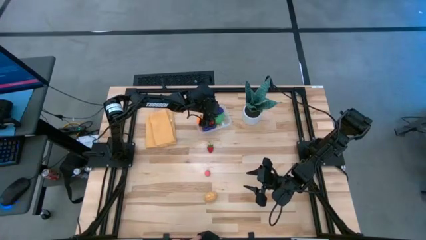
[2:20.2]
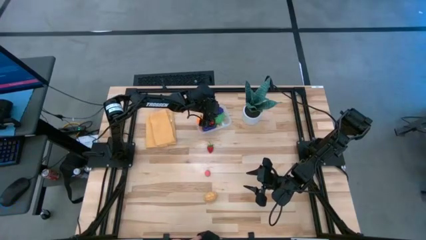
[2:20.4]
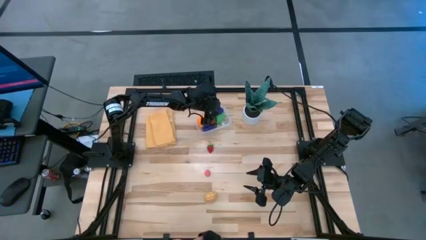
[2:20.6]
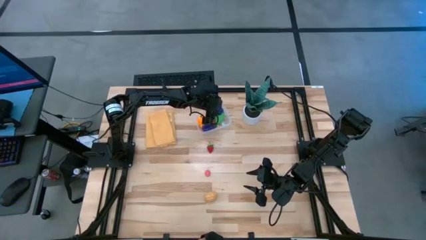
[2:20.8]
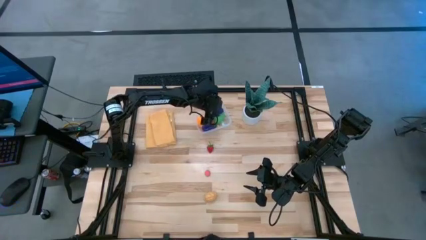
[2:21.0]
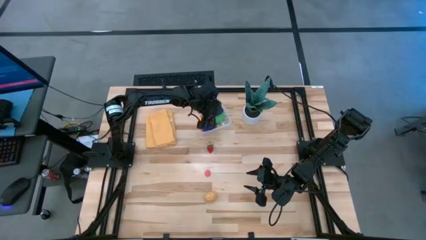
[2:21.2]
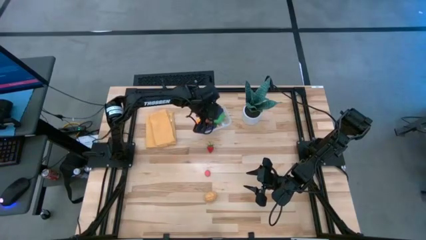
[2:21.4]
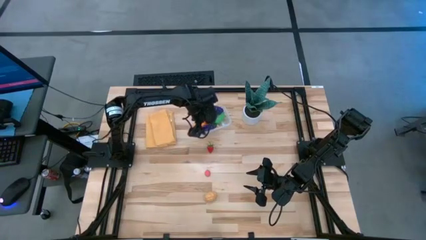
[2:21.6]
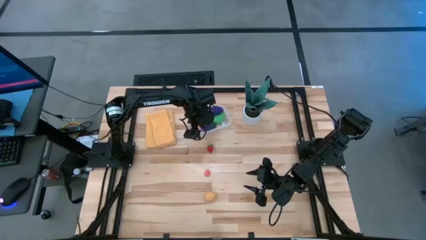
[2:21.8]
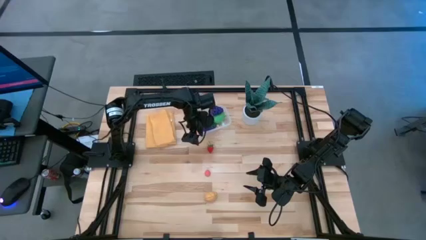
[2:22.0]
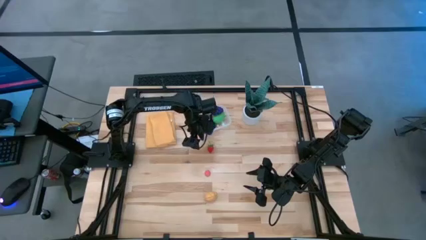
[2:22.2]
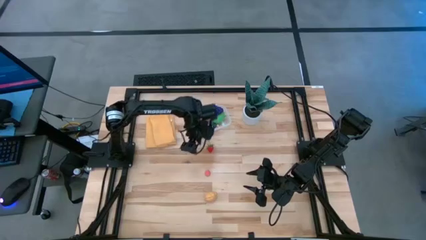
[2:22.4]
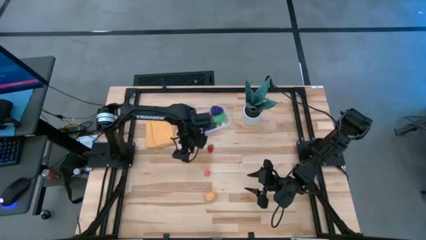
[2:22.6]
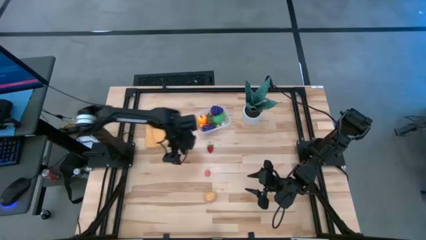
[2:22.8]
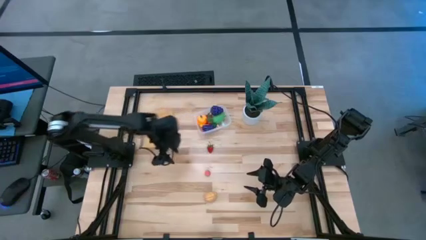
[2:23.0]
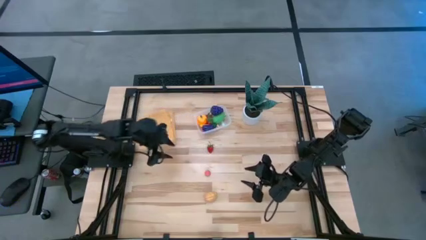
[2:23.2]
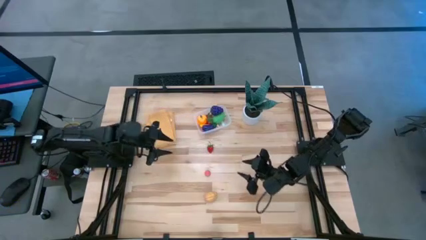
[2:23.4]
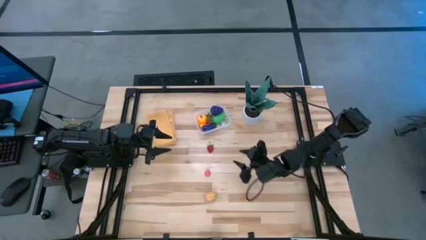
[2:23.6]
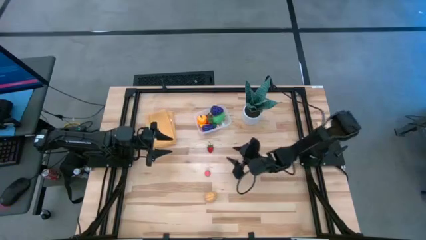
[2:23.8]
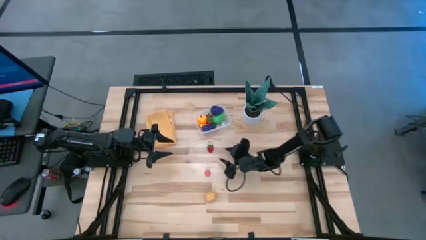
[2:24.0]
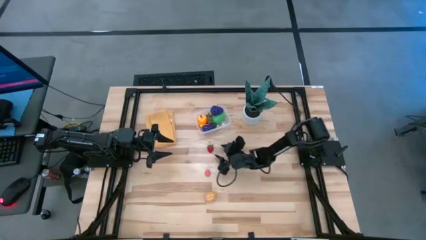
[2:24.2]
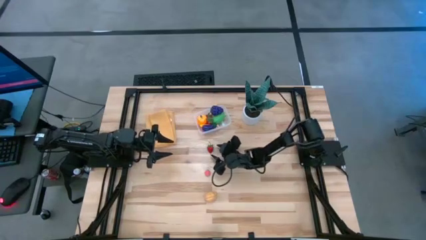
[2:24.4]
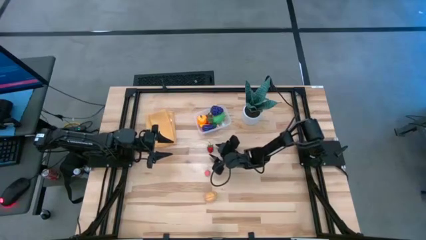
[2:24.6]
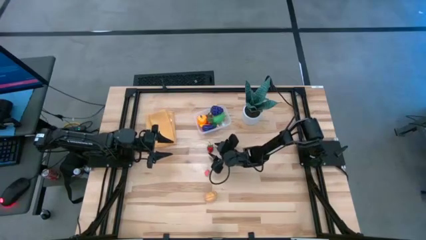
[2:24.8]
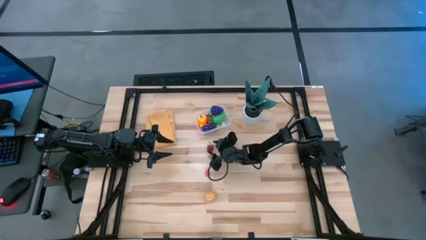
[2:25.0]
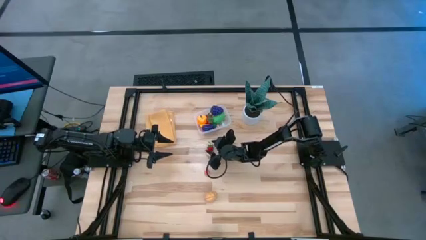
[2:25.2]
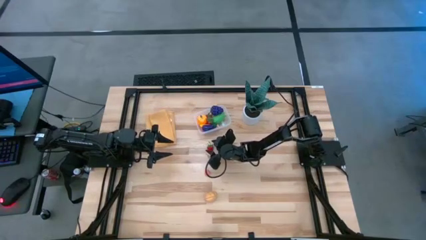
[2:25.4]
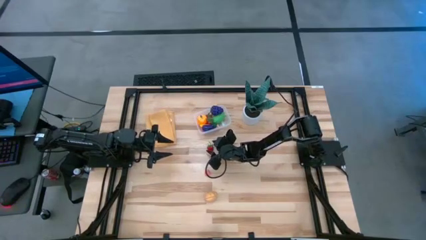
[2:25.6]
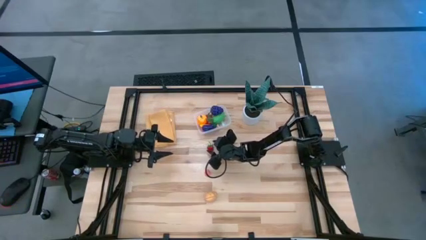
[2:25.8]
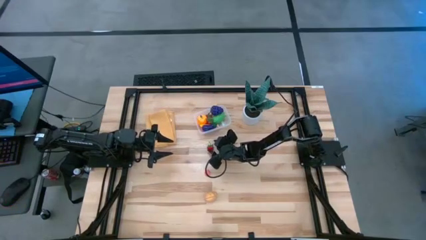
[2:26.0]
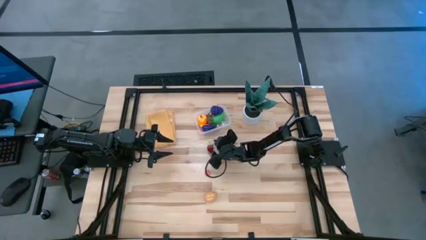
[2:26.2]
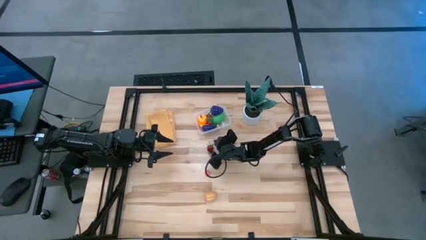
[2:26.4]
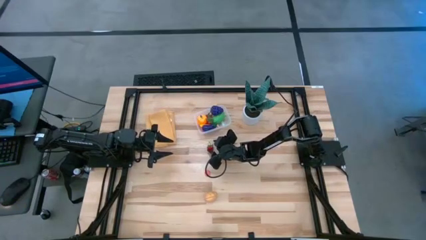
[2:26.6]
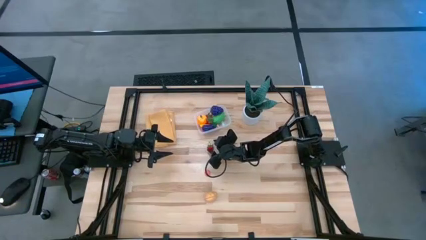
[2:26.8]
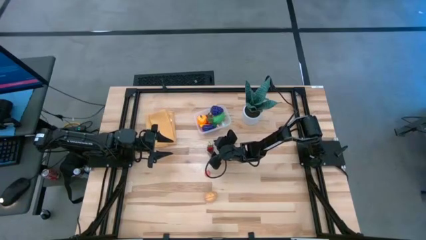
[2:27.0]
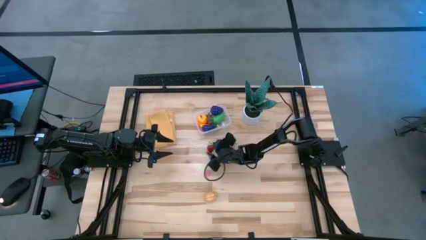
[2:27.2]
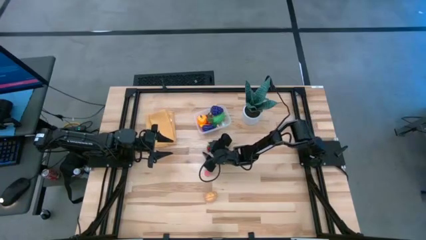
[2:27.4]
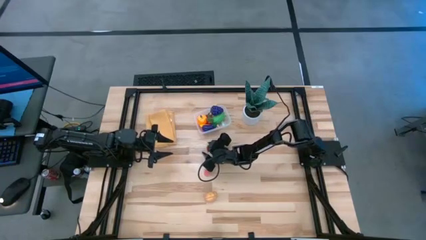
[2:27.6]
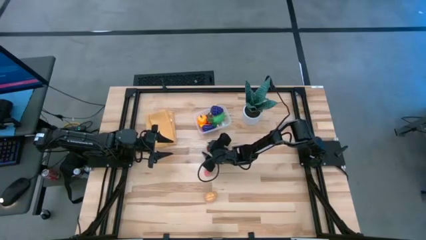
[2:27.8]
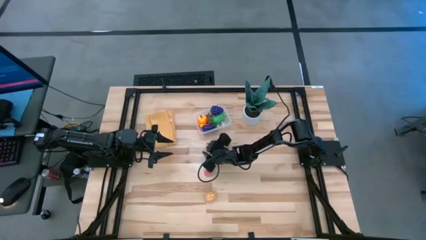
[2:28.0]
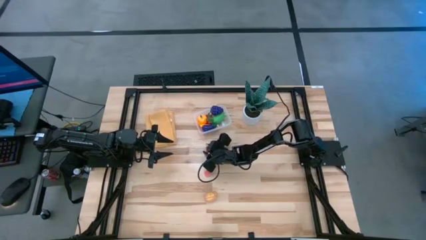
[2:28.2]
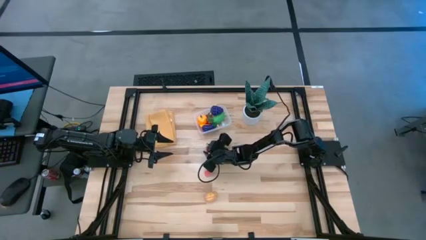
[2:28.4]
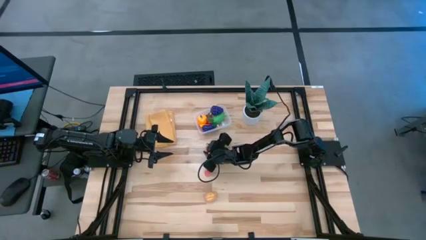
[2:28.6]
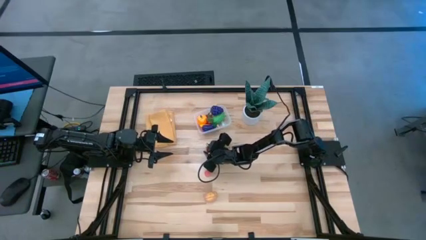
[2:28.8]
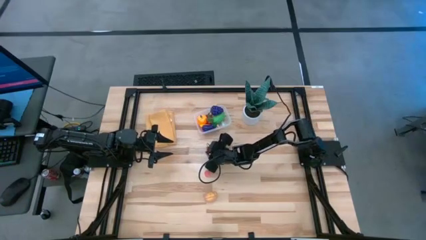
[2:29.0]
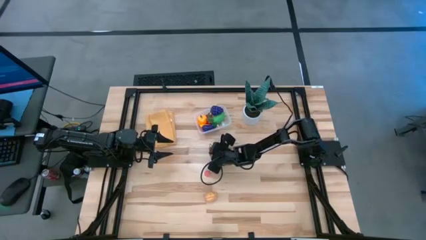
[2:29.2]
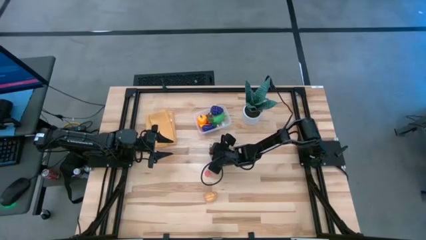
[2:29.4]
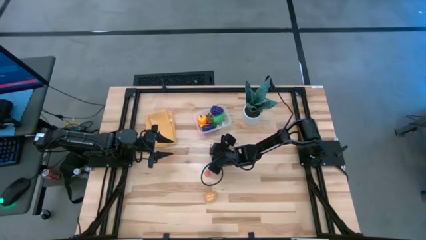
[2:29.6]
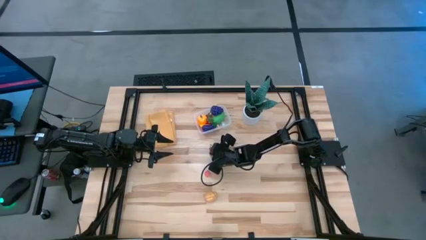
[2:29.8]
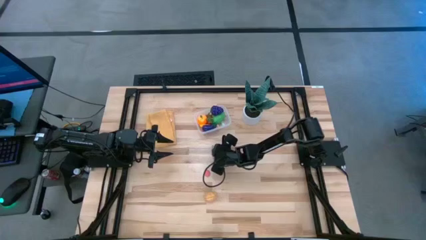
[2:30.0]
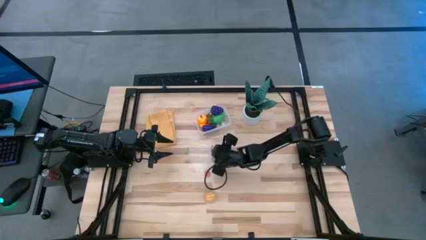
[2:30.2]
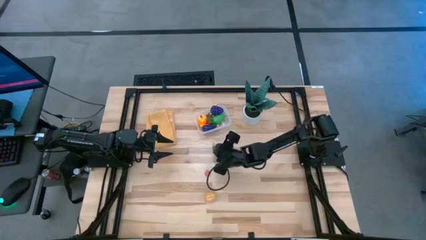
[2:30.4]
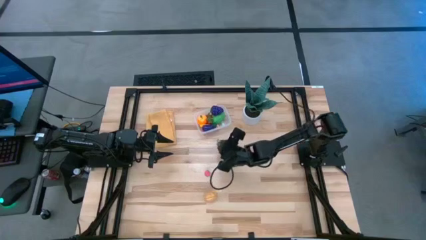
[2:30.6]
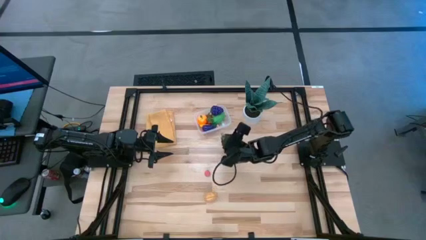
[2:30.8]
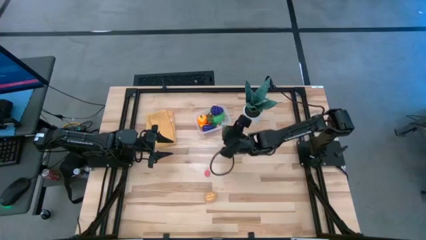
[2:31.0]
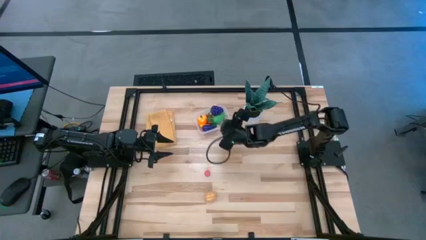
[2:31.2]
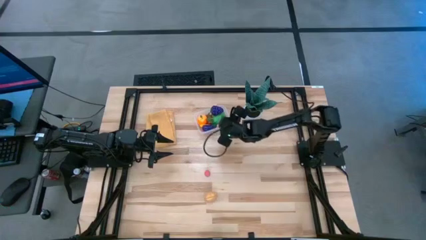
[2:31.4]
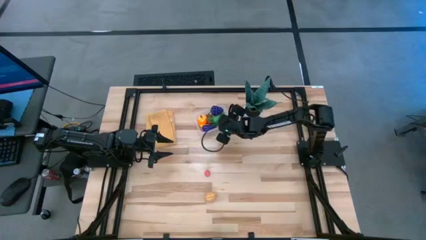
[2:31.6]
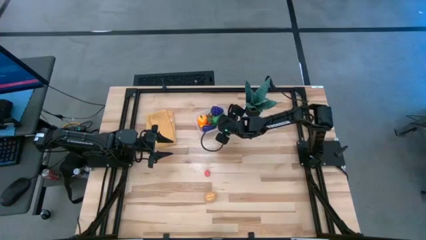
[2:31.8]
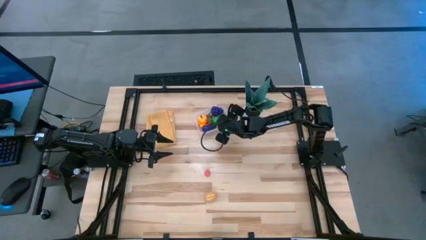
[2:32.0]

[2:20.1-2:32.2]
Task: Pick and placing Produce into tupperware
Put the strawberry into the transparent bin

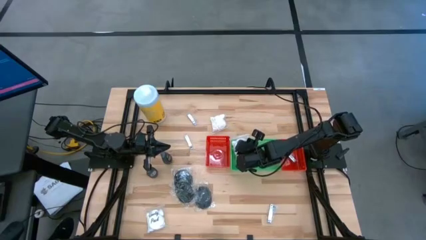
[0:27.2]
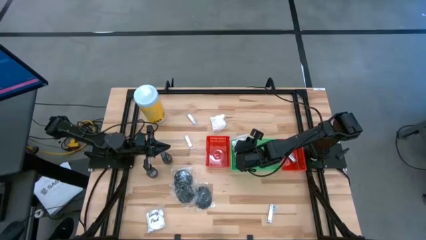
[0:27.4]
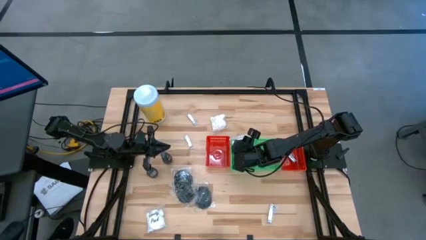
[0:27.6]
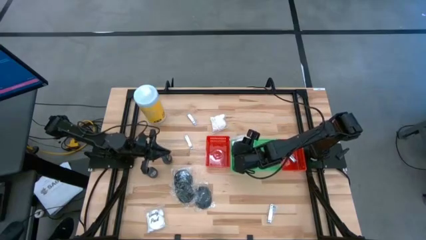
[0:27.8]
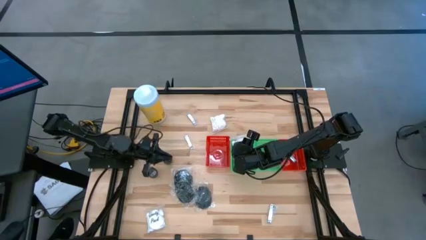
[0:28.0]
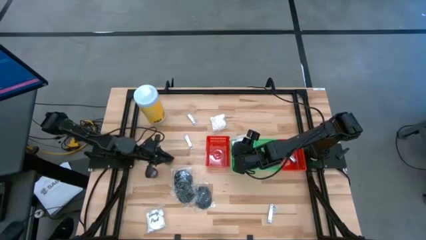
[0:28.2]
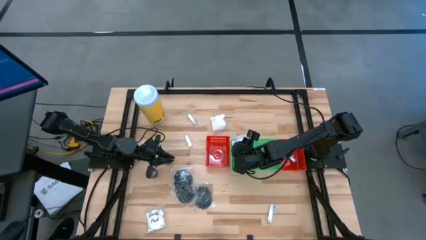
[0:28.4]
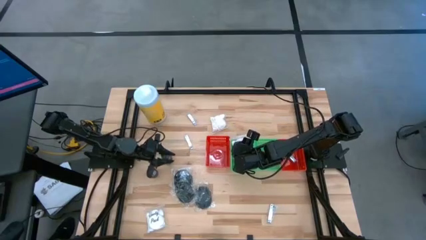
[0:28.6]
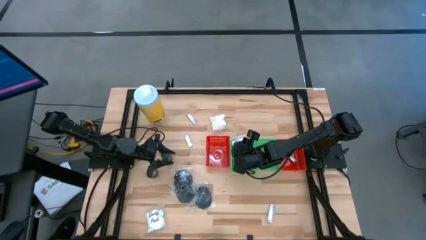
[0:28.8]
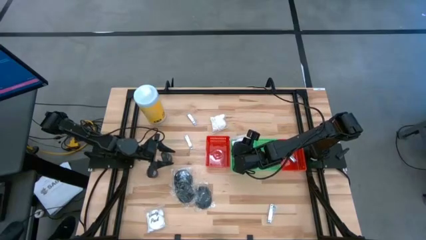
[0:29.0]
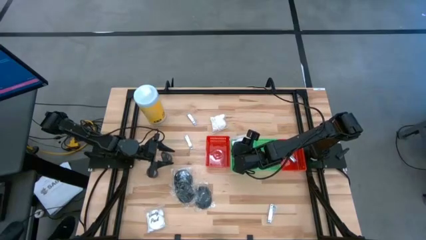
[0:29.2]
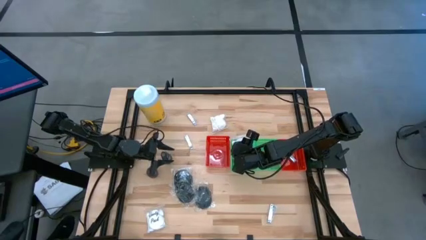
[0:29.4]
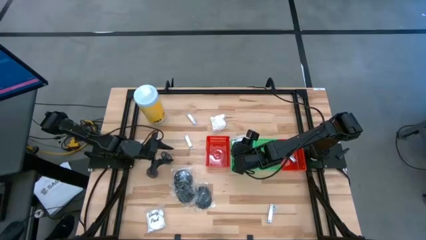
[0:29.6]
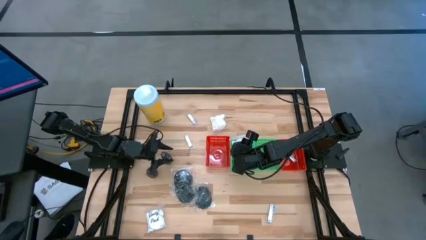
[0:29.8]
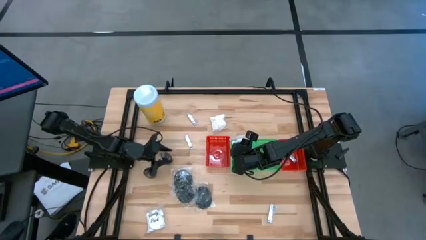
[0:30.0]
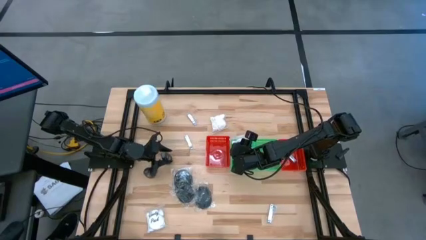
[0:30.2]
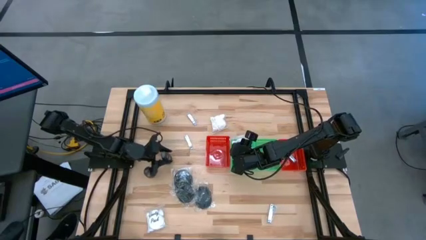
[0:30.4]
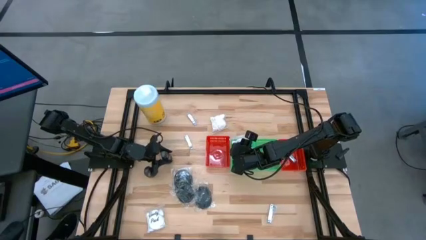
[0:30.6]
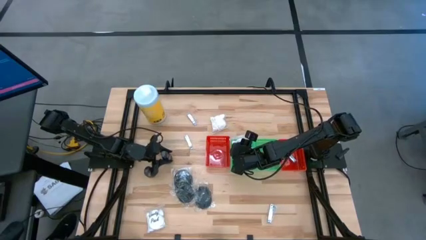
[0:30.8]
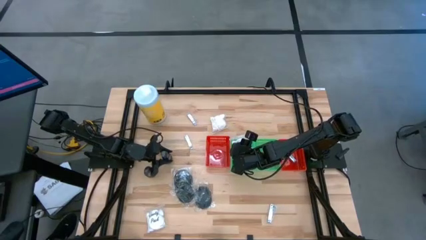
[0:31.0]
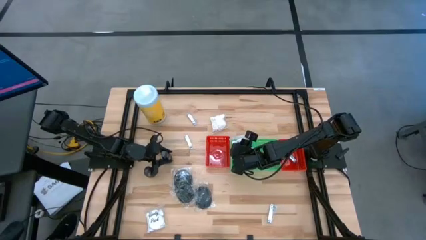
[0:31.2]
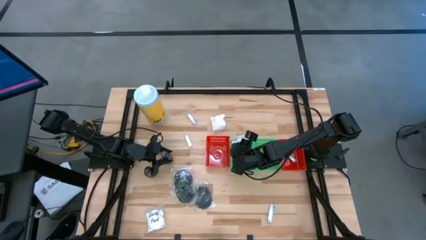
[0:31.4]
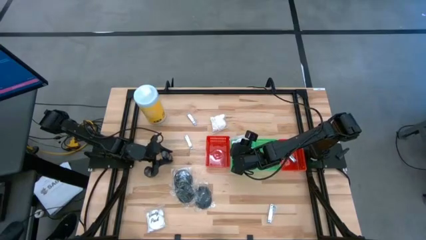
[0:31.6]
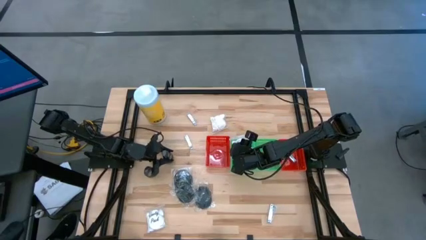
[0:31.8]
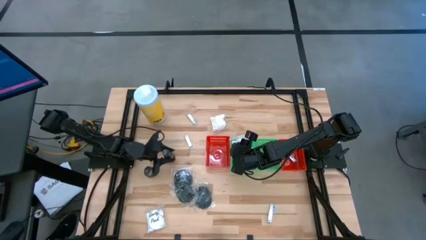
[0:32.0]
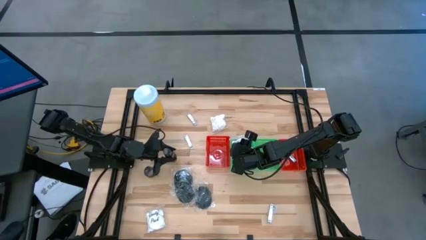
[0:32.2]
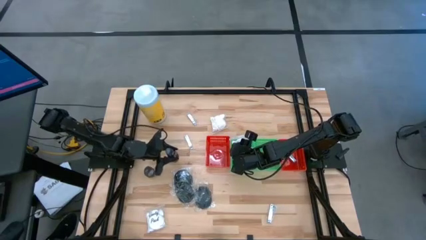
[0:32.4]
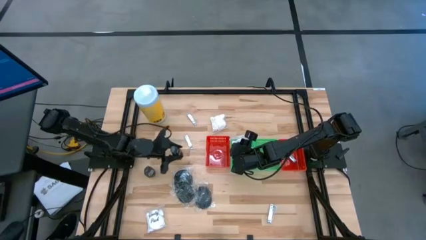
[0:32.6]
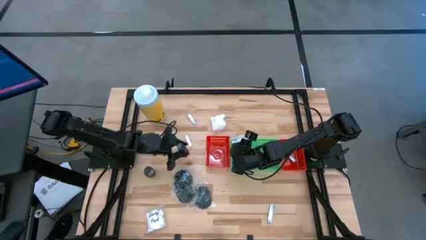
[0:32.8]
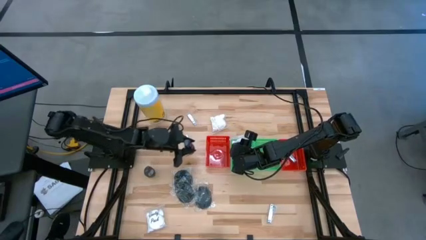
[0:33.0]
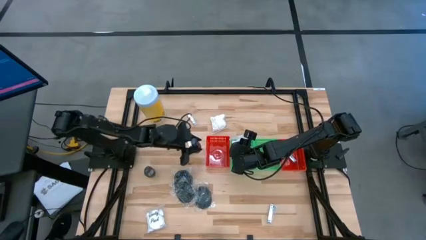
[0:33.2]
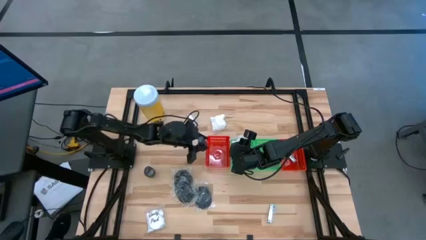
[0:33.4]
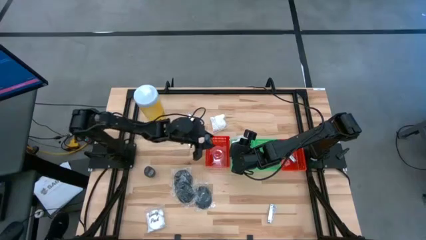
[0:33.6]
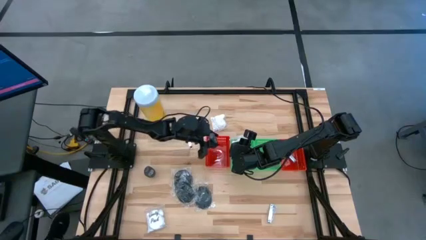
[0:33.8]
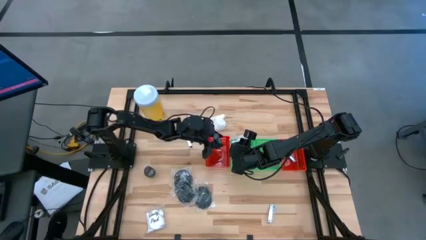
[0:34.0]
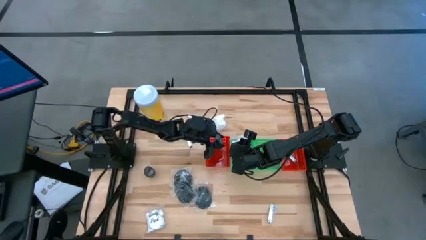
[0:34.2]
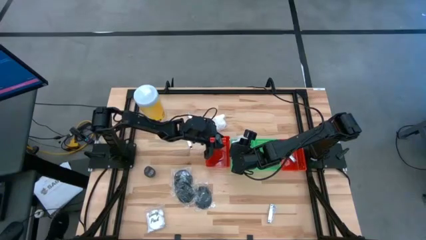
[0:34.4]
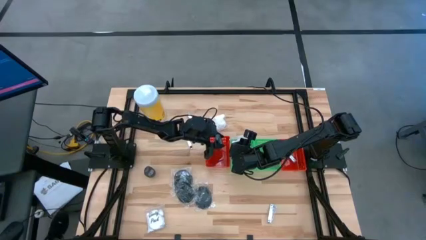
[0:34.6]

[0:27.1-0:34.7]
Task: Pick & Place Travel size toiletries
Put the black deodorant into the left red bin
